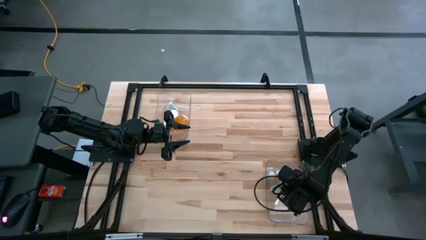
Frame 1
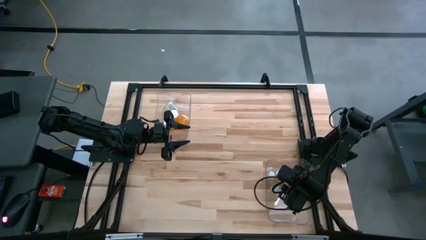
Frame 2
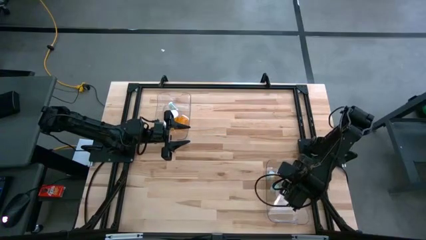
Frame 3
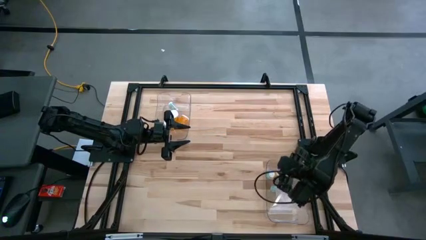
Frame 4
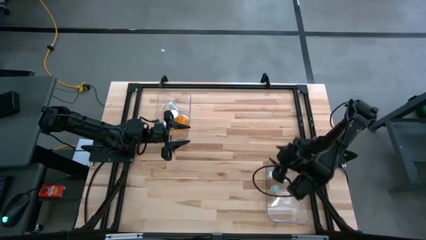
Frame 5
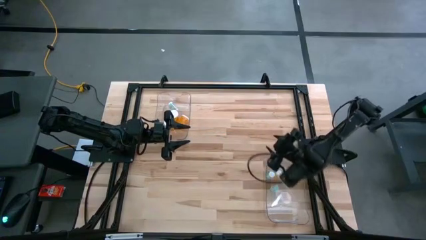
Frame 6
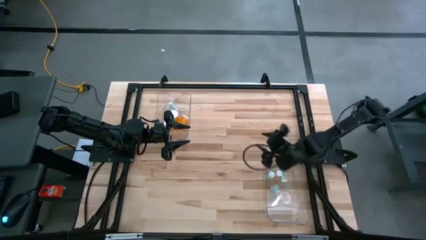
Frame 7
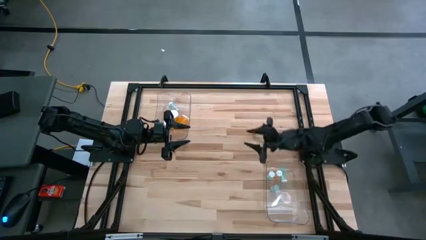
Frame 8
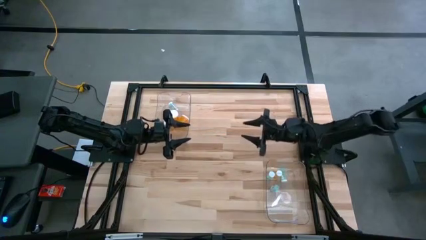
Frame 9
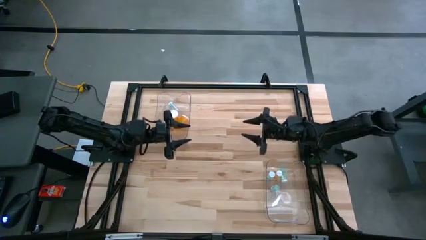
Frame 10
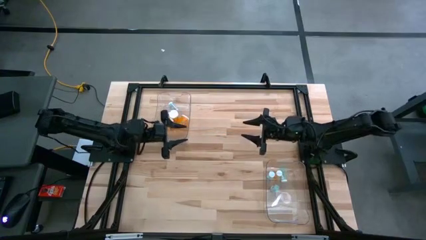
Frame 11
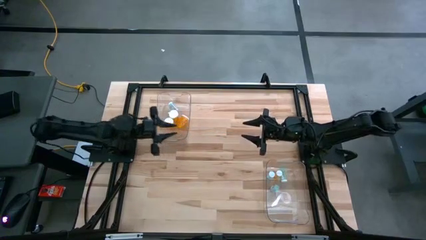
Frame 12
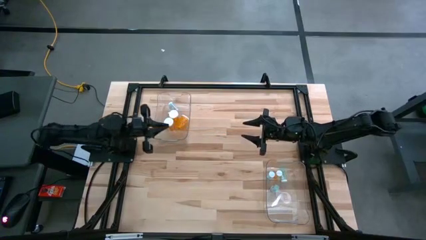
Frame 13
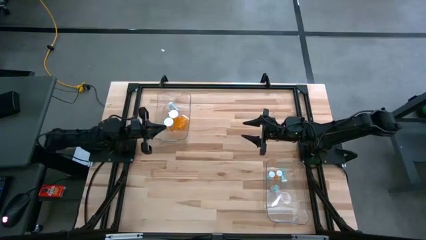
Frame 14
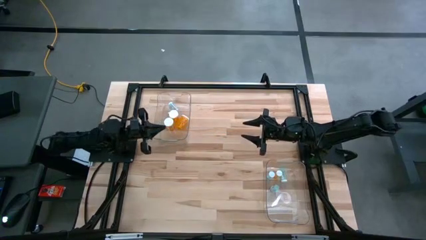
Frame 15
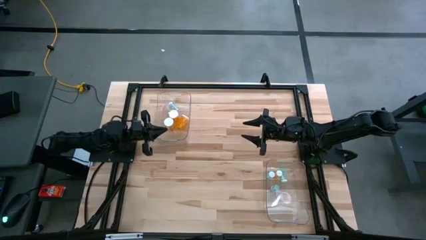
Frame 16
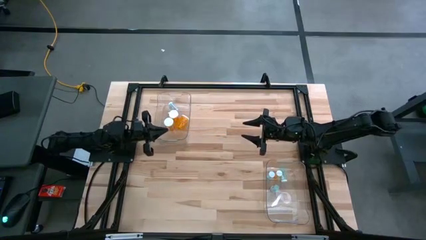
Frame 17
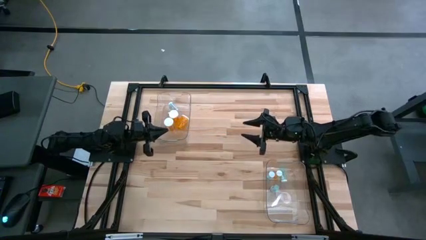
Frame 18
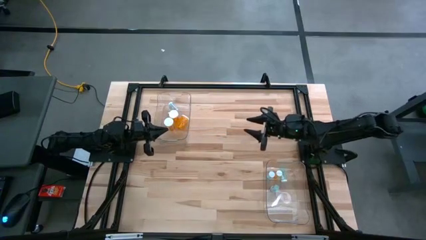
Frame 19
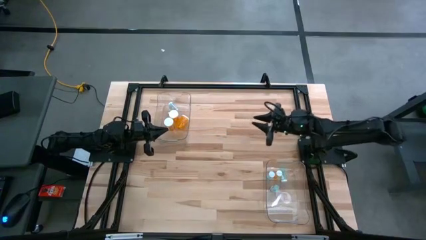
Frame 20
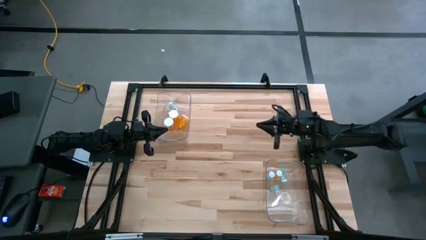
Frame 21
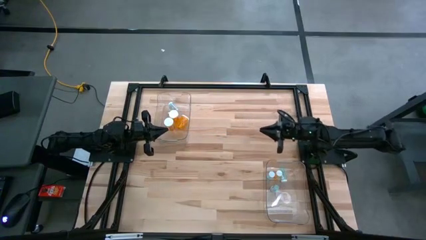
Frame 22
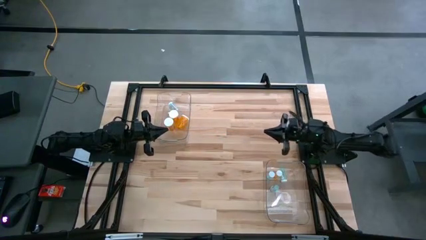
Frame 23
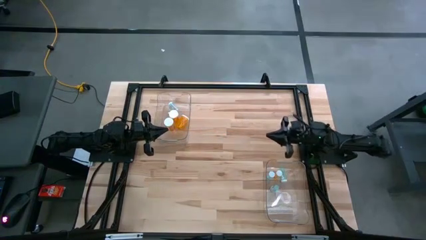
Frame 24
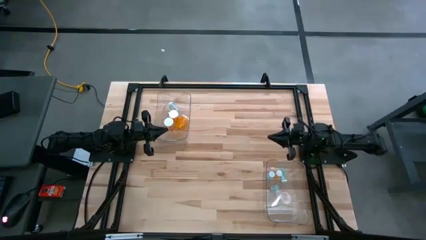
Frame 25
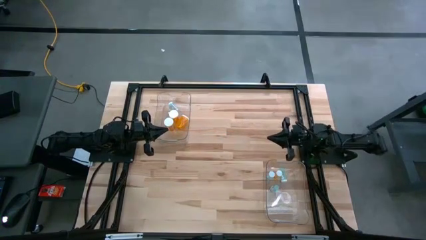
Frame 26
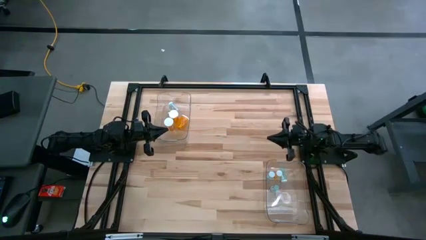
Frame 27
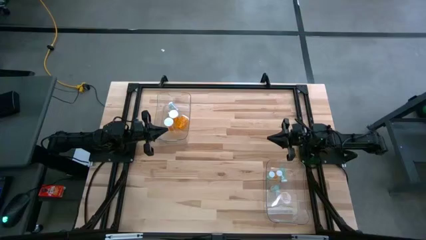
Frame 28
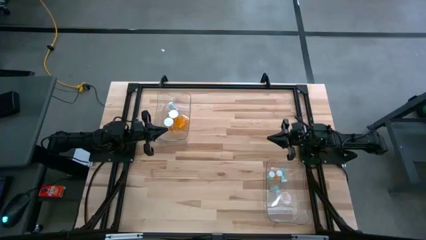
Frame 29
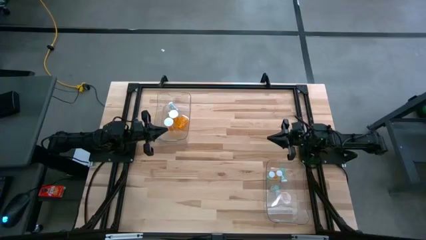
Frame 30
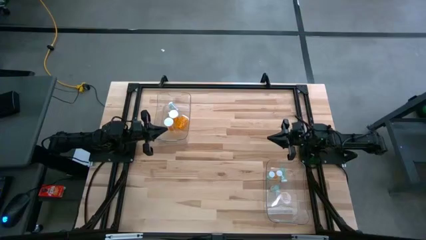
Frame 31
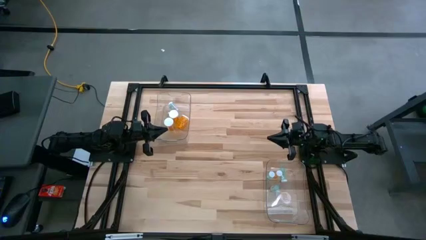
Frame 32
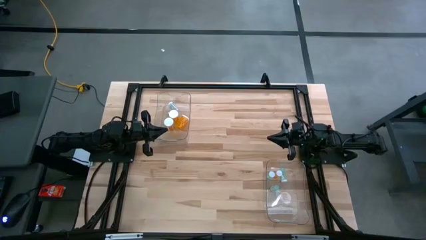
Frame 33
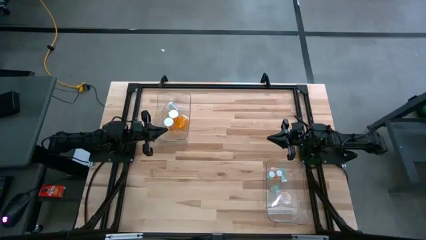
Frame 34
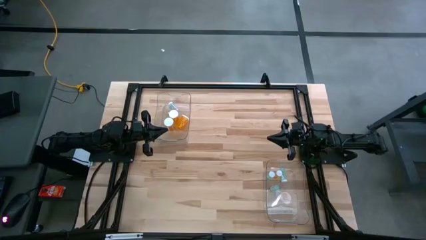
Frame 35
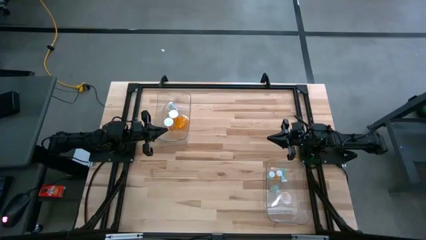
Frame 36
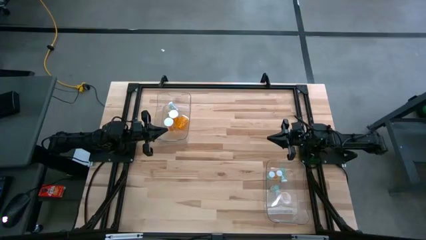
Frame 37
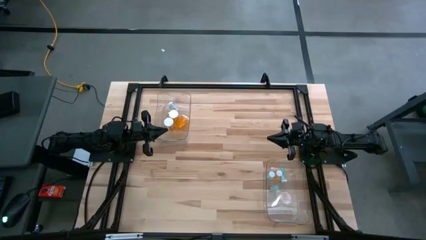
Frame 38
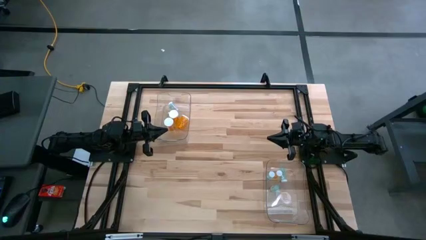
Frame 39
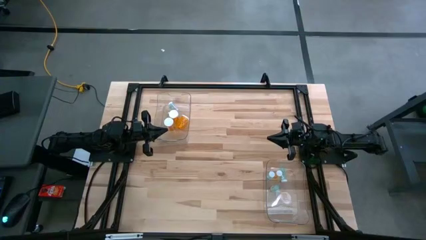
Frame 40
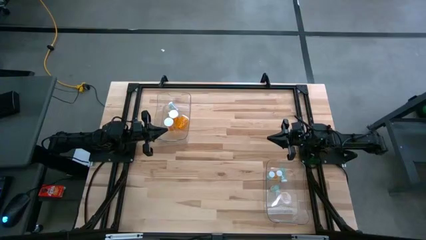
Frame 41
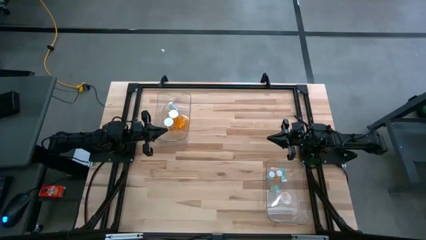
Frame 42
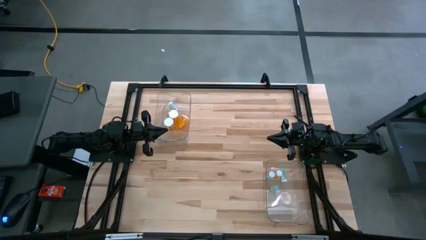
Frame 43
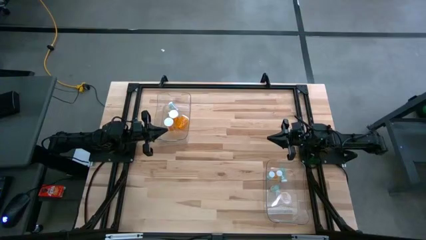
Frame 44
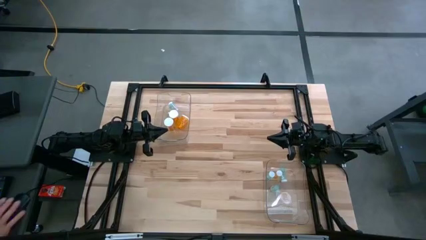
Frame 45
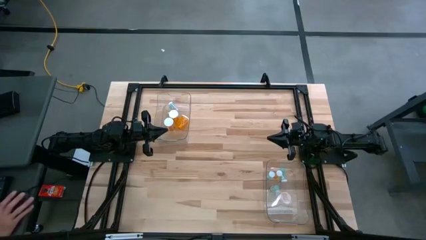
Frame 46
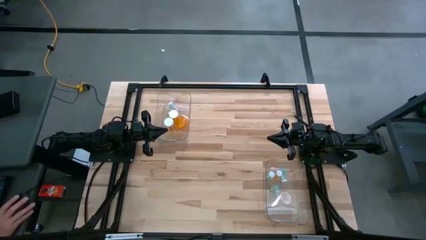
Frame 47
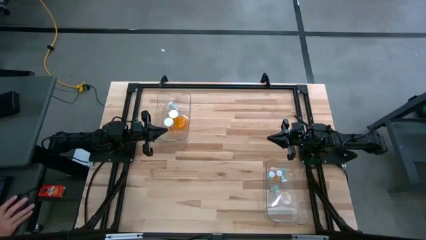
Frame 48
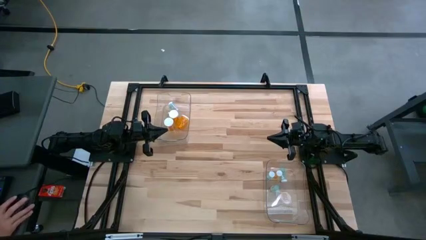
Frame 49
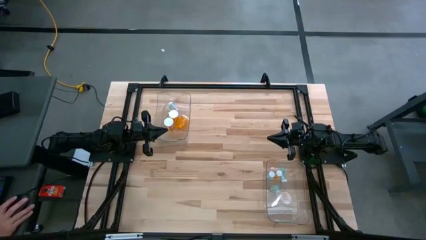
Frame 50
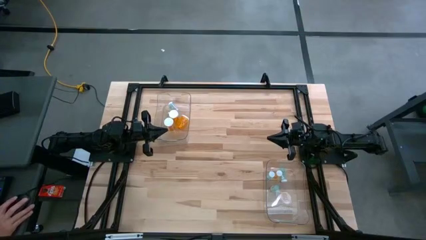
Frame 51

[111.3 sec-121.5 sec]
Task: Pick and place medicine bottles into bin by pill shape (circle, oval)
Return to Home Position

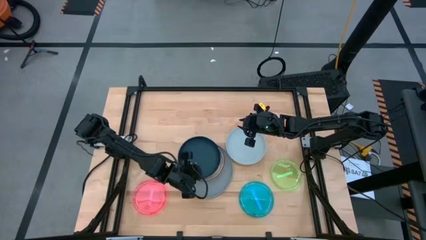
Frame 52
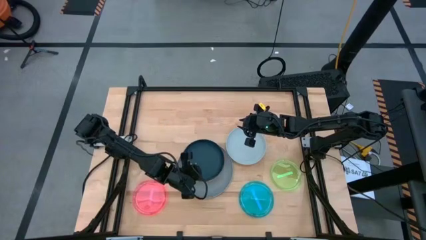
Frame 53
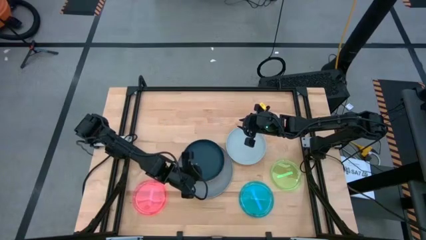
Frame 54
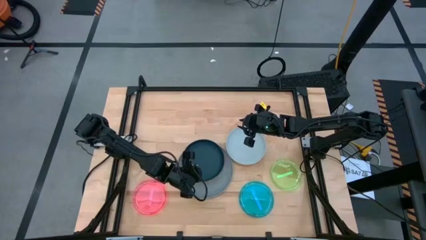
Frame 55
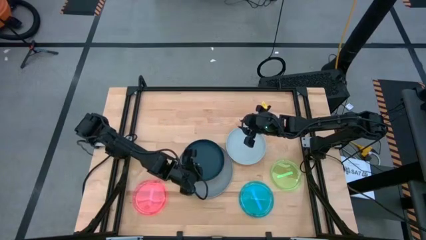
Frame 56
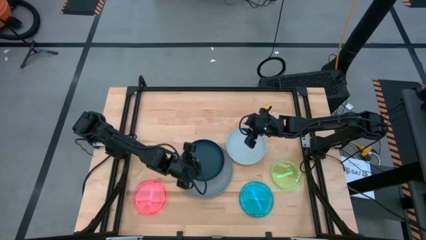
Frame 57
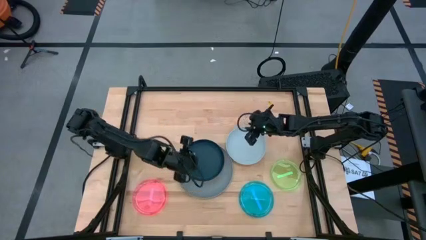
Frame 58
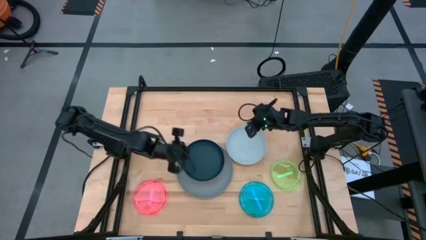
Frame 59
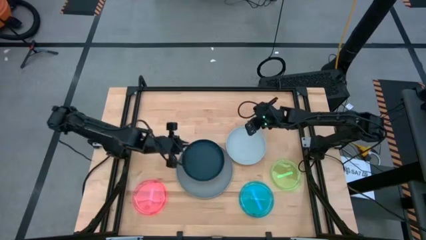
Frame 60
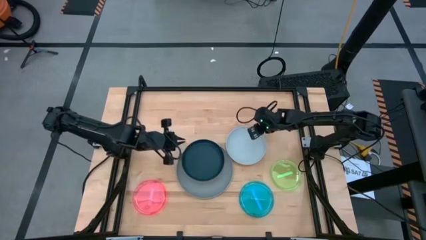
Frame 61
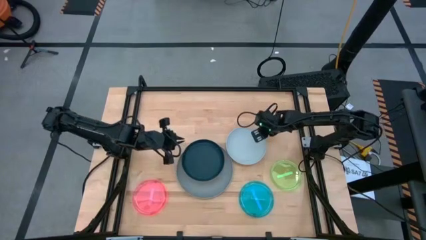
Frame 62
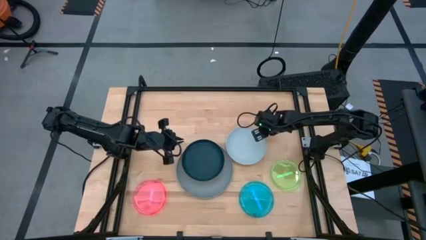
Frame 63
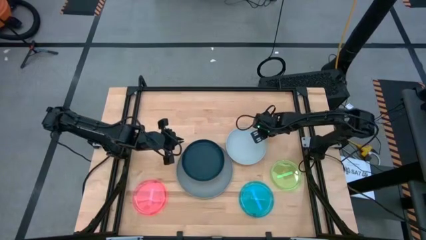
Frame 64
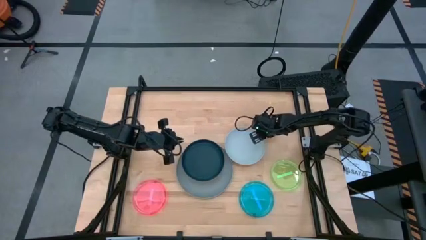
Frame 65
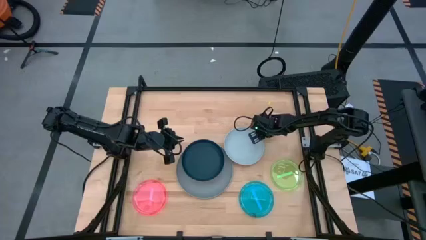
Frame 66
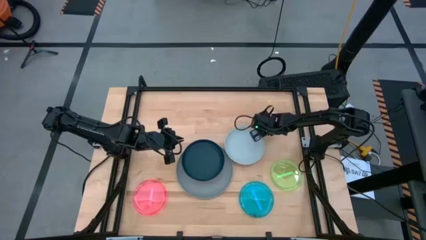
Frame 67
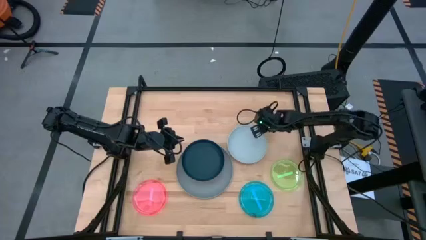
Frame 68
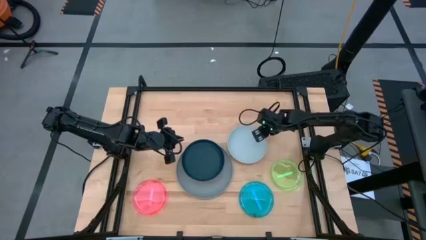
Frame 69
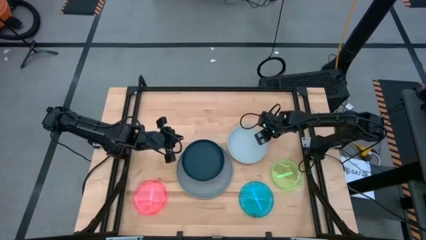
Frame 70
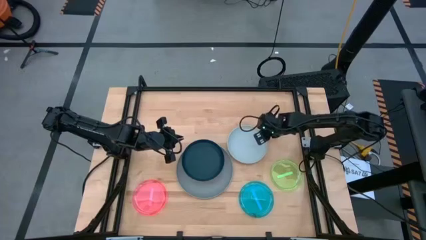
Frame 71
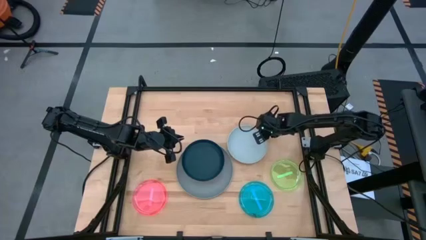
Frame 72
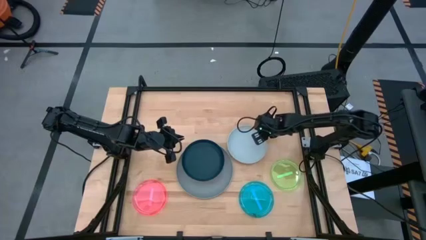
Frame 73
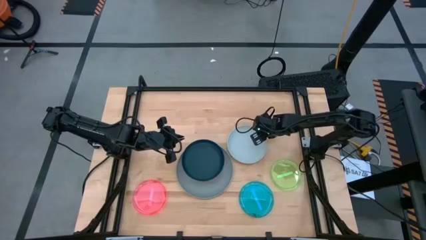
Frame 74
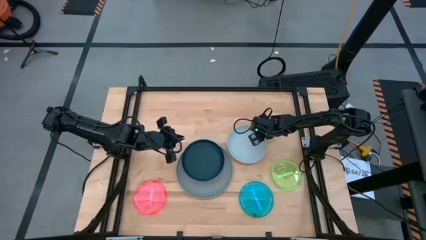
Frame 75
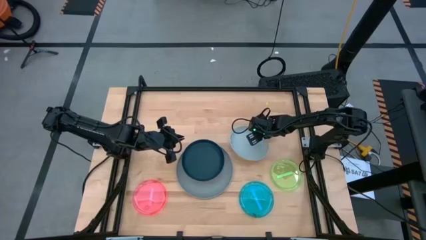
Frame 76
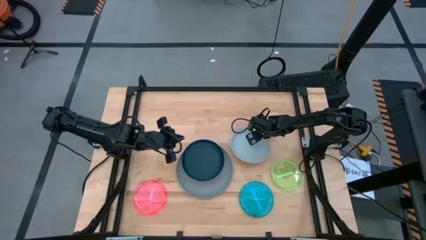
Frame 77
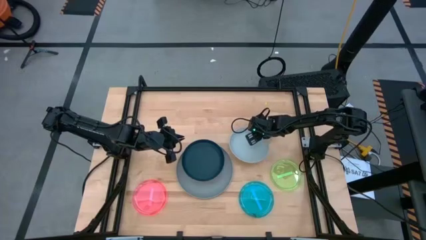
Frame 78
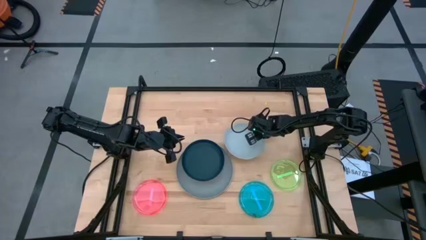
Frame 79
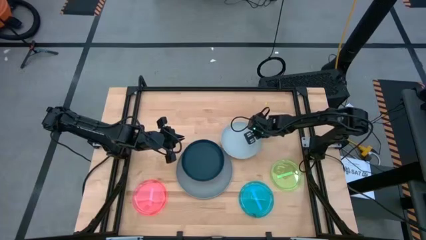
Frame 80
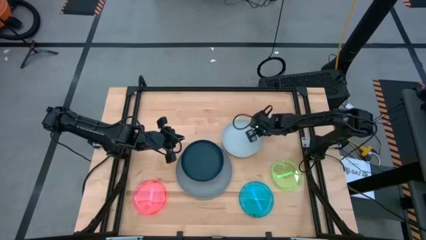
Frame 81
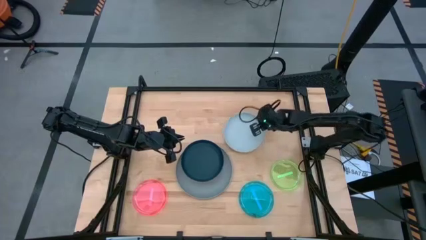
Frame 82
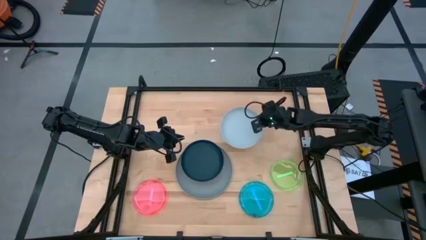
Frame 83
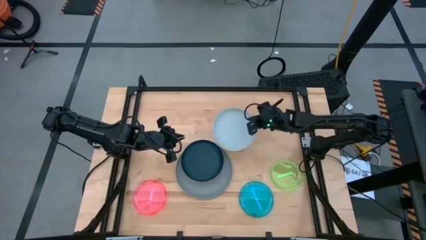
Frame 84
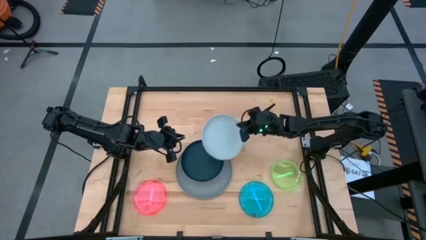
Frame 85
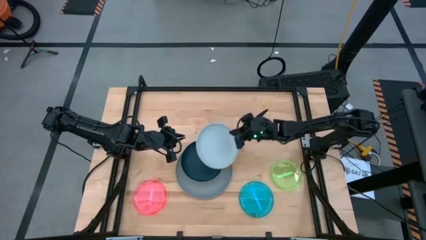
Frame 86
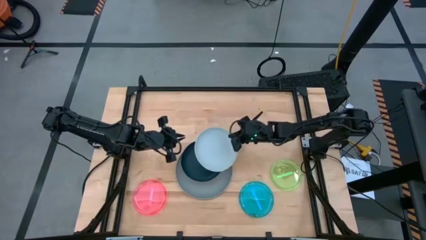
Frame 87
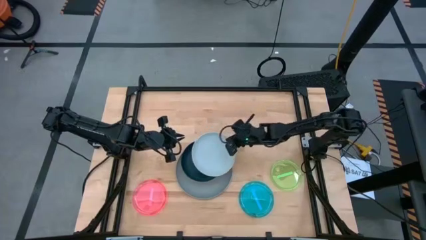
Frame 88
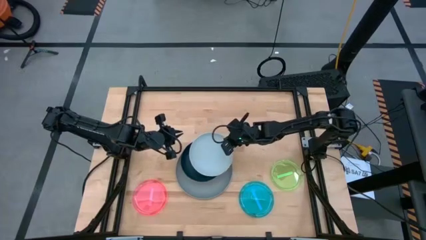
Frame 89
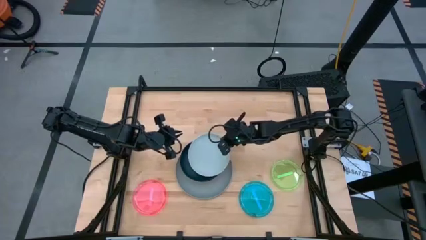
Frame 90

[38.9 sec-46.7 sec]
Task: Stack plastic plates
Stack the light blue plate on top of the dark blue plate
